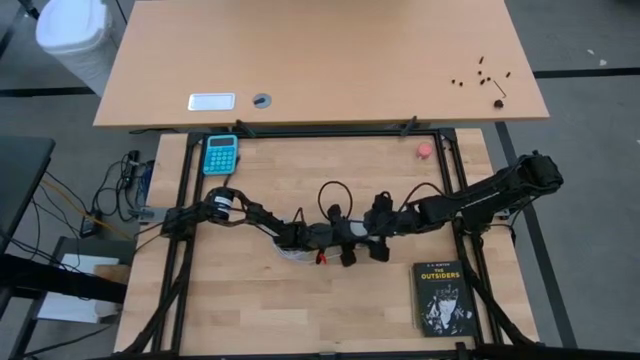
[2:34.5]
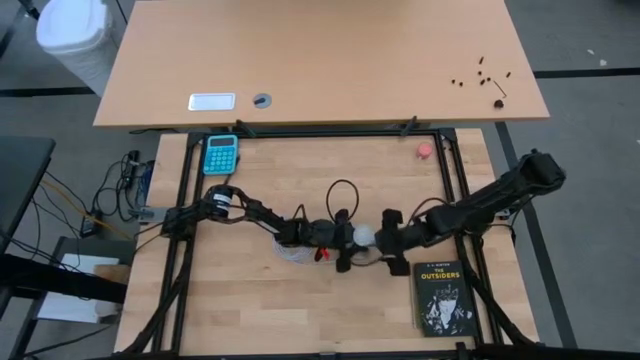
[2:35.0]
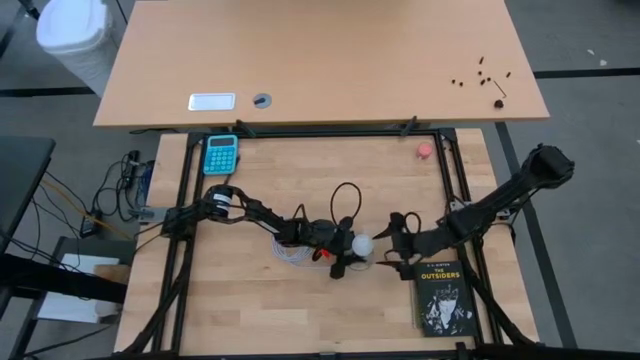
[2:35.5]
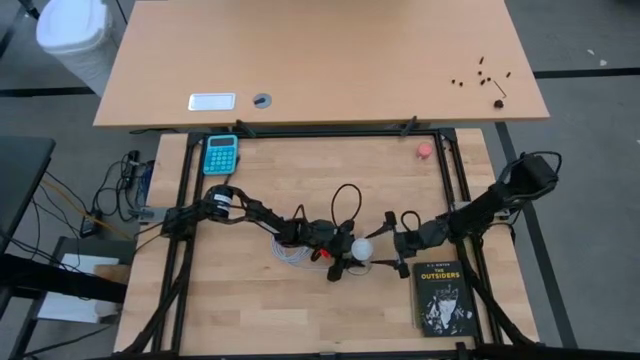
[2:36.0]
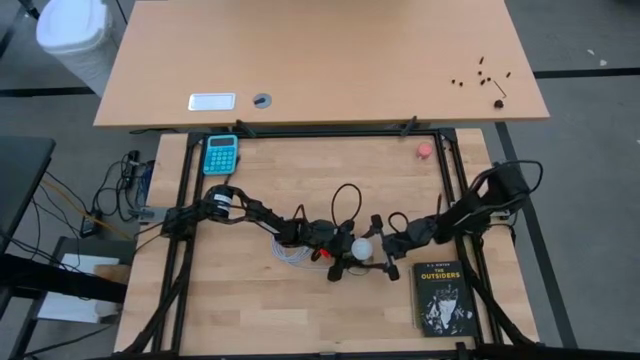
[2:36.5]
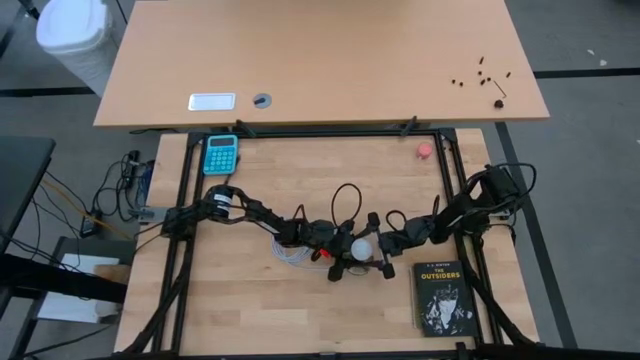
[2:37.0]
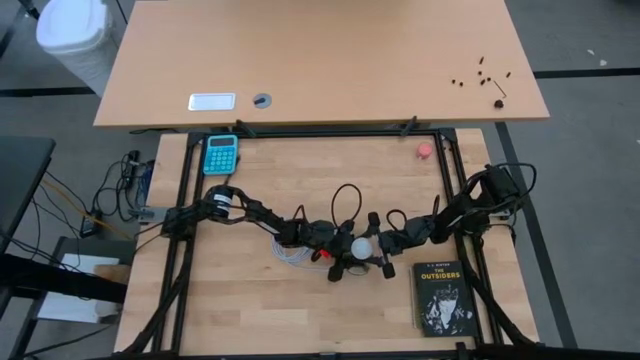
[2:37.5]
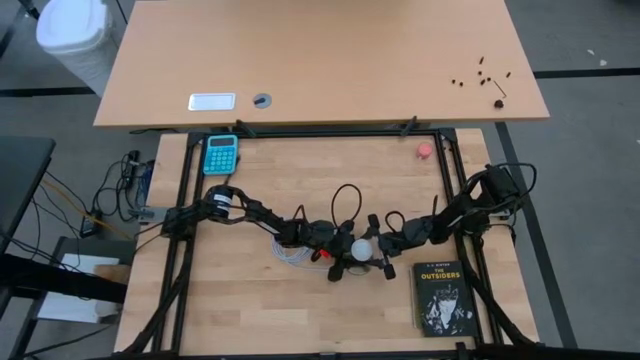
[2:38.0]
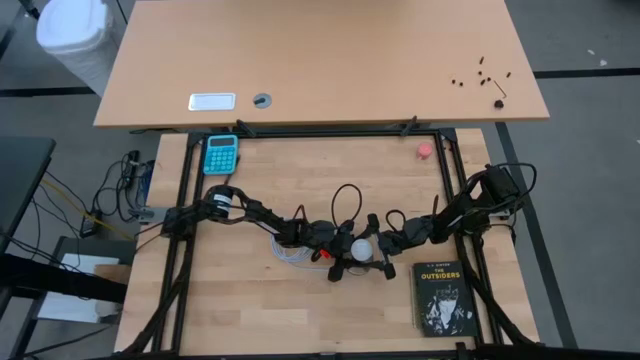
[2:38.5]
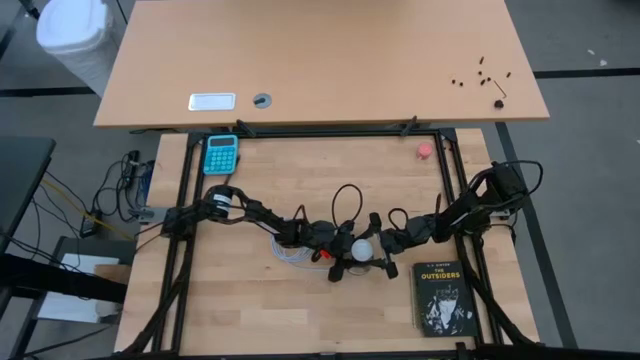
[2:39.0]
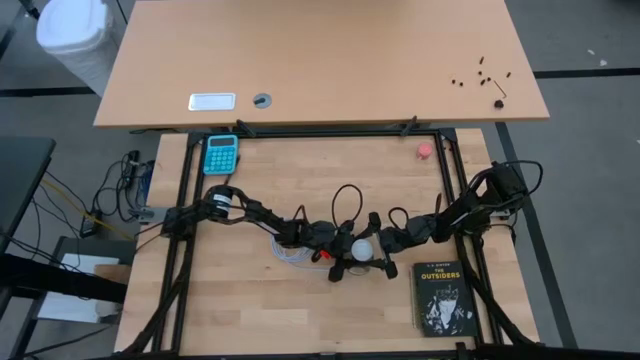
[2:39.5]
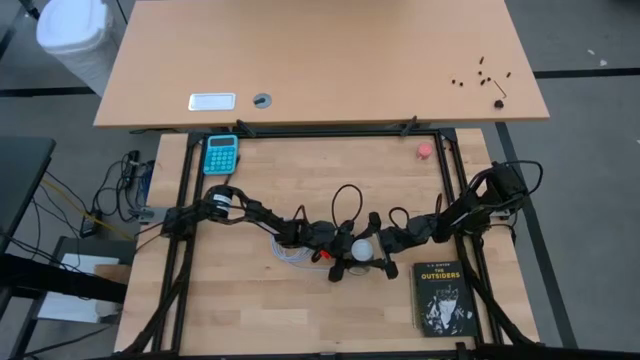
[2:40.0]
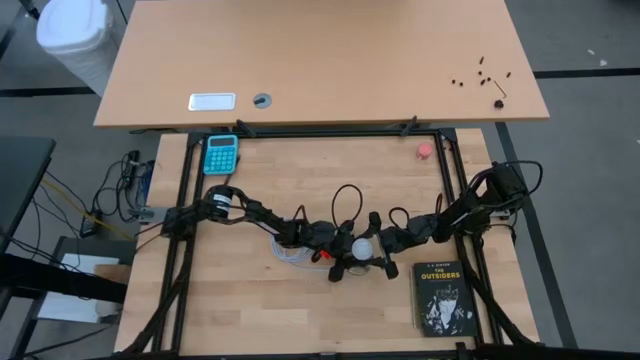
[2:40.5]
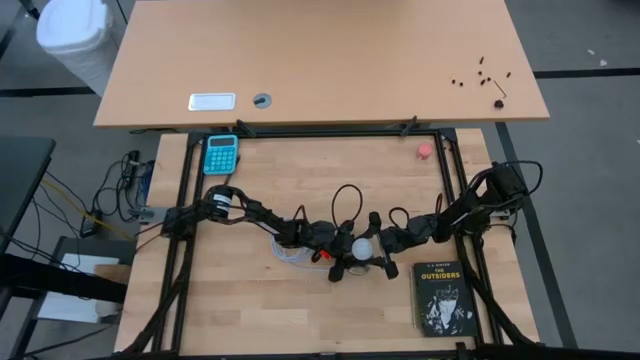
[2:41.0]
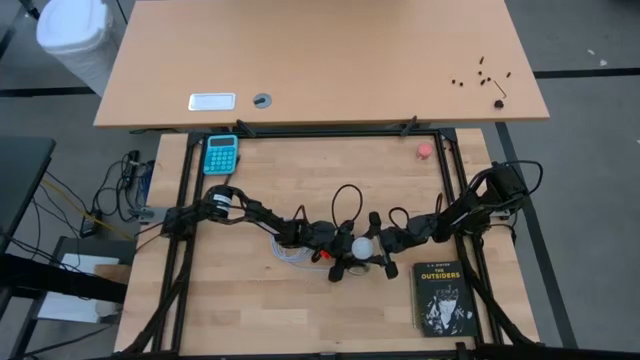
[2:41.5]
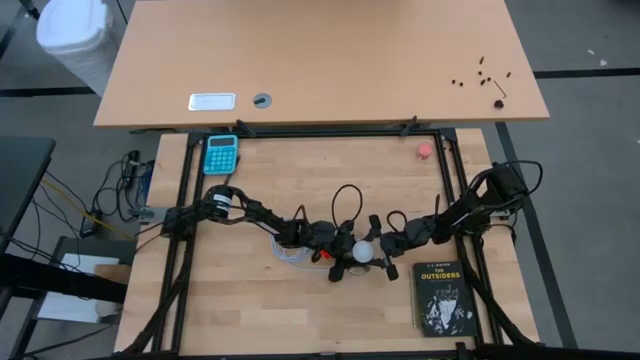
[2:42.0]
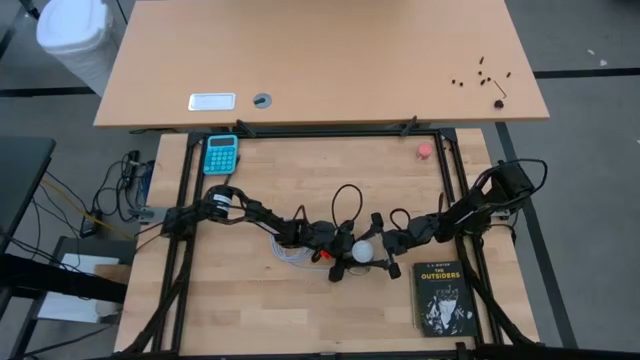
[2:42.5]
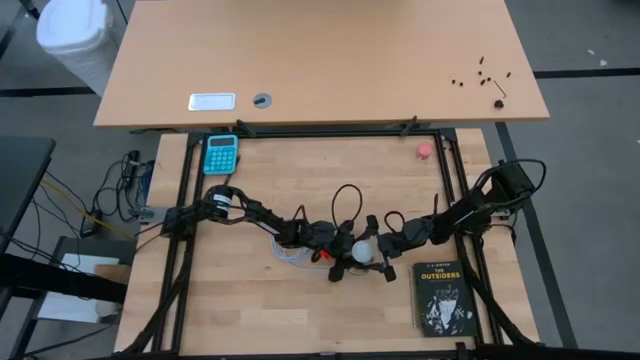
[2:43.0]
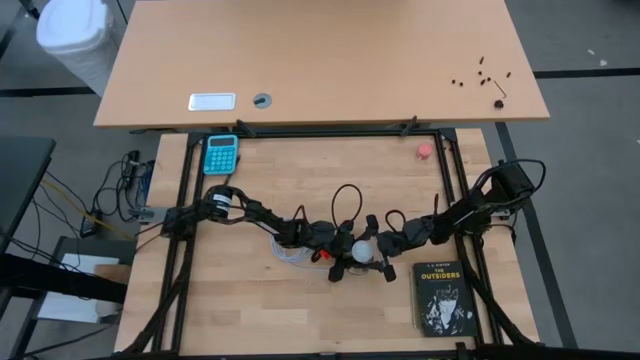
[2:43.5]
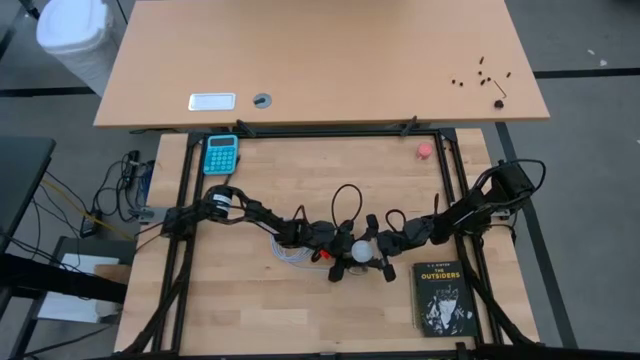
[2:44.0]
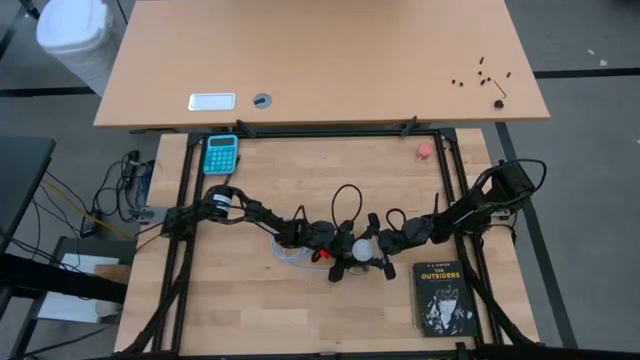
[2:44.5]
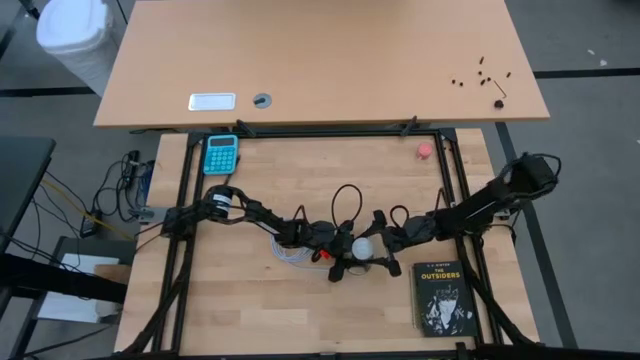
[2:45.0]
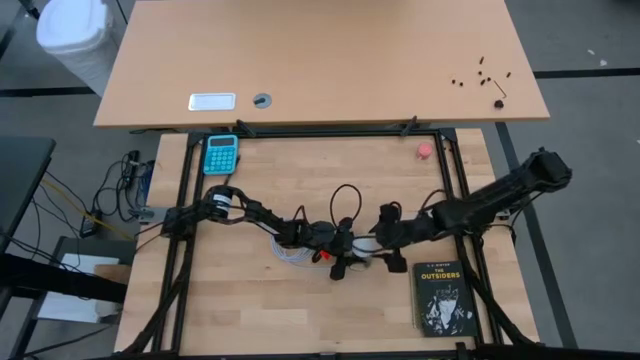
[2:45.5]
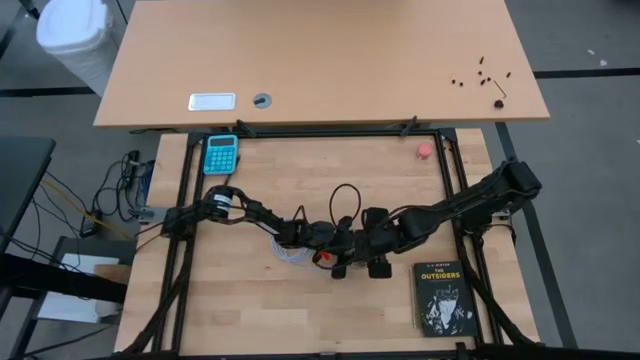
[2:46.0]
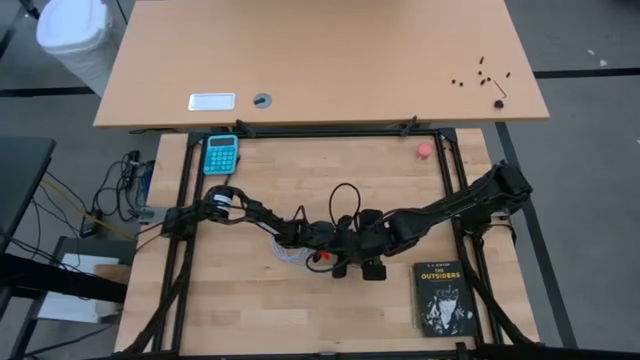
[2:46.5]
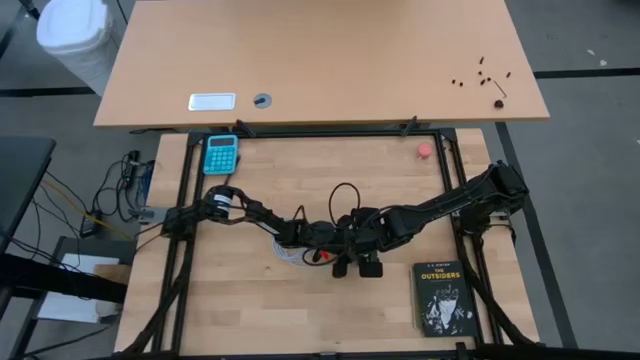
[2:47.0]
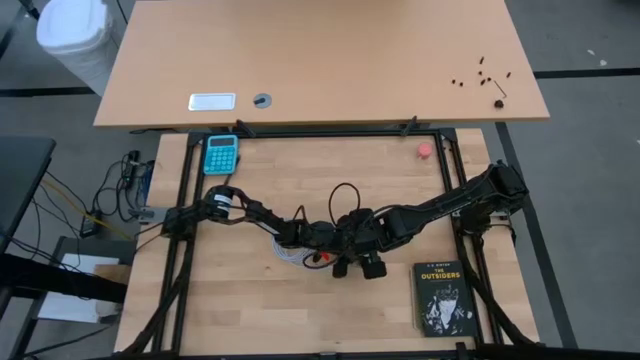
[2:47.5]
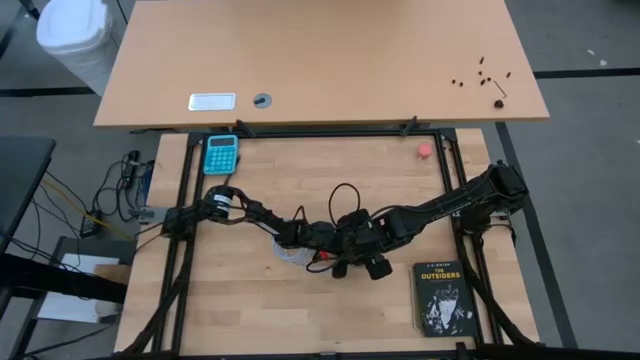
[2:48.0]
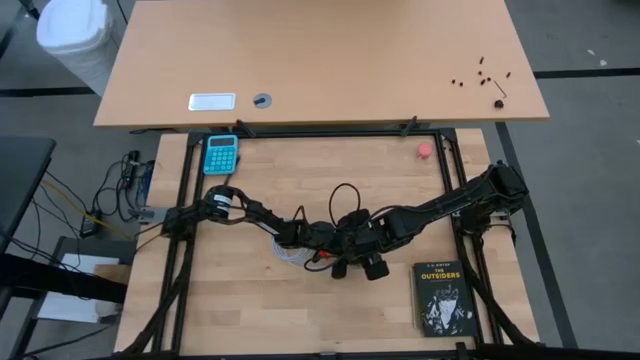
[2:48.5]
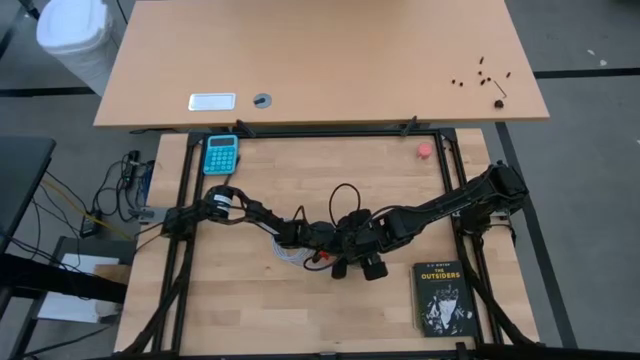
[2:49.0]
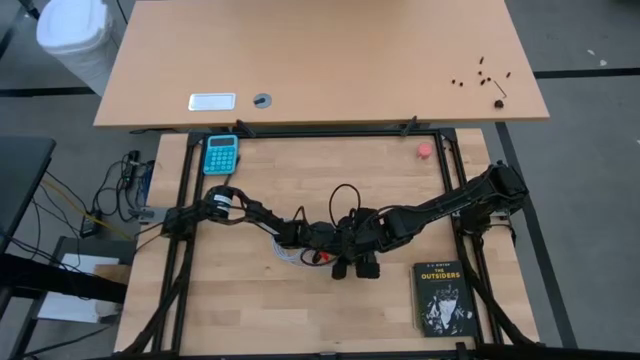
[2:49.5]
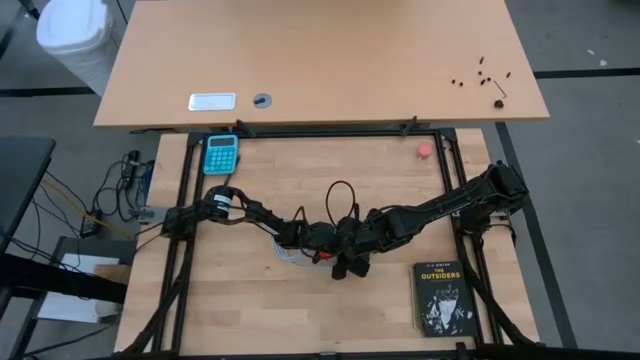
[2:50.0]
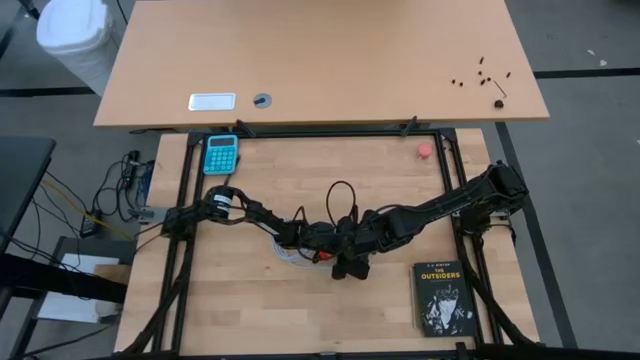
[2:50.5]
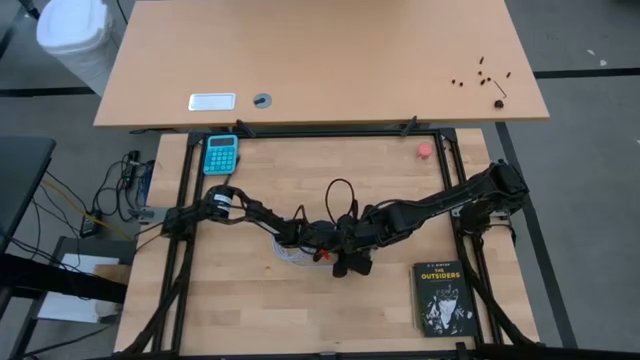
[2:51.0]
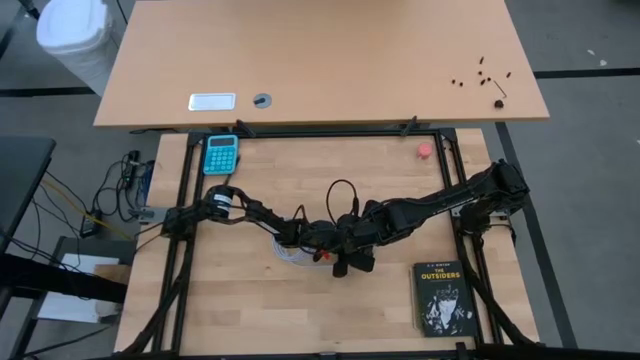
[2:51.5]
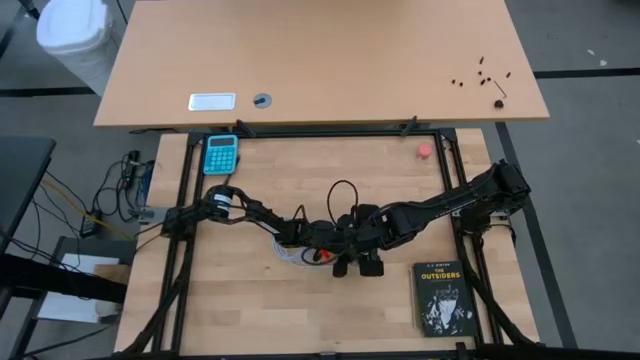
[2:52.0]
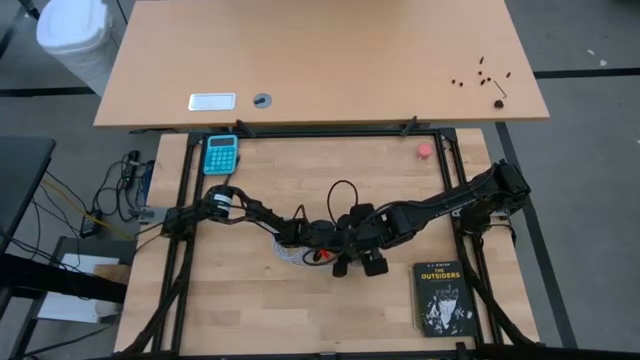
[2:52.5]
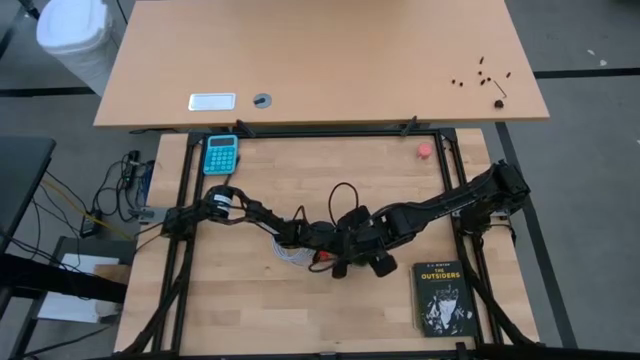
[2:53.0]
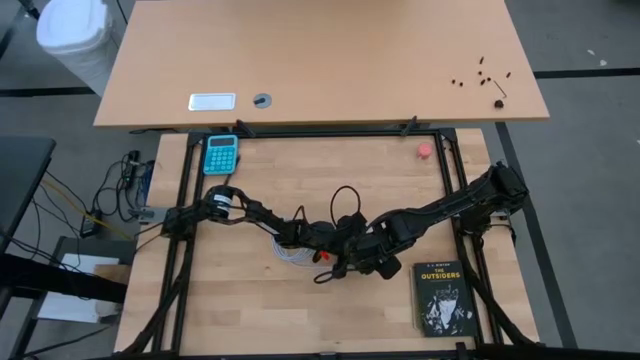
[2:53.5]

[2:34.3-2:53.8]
Task: Screw lightbulb
Insert the lightbulb into the lamp
